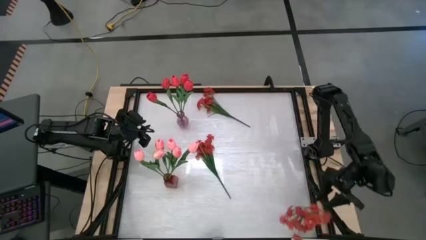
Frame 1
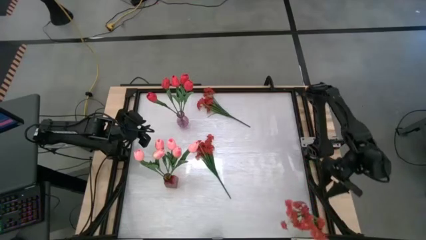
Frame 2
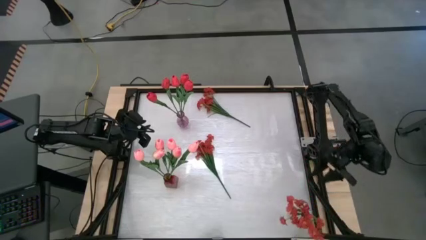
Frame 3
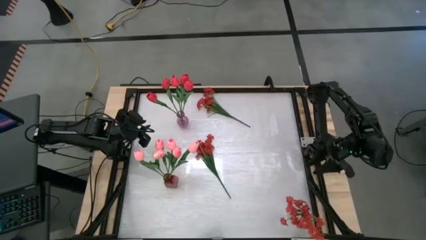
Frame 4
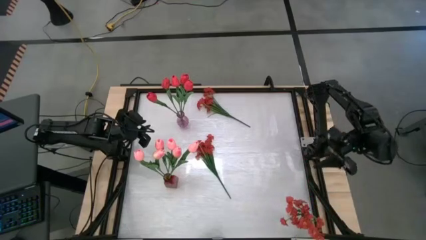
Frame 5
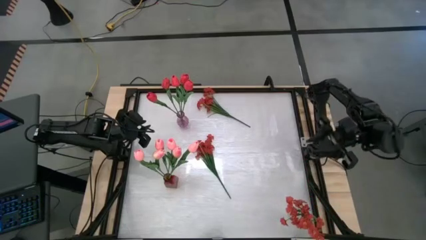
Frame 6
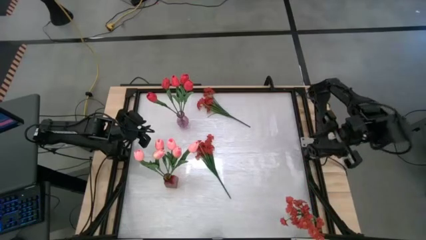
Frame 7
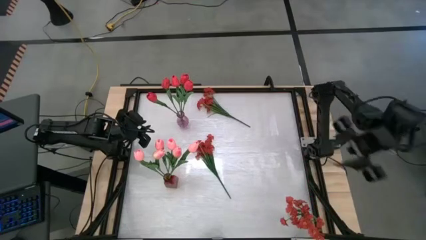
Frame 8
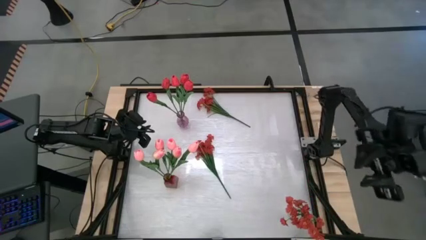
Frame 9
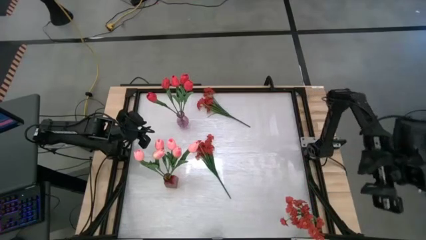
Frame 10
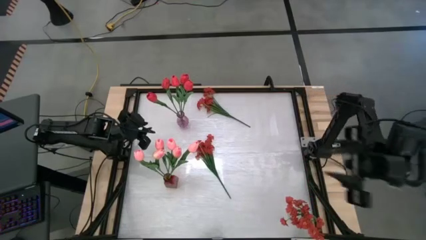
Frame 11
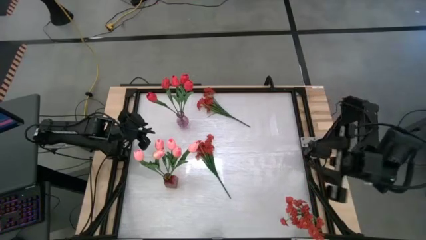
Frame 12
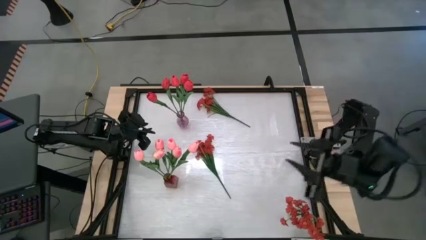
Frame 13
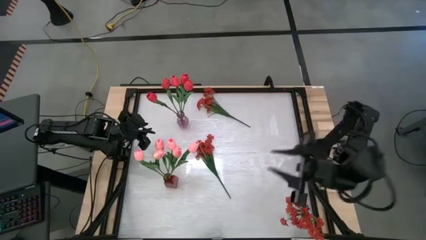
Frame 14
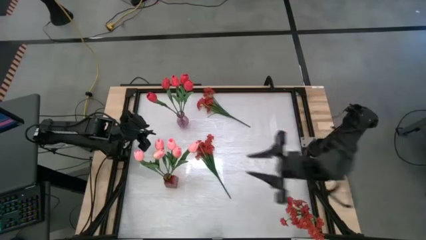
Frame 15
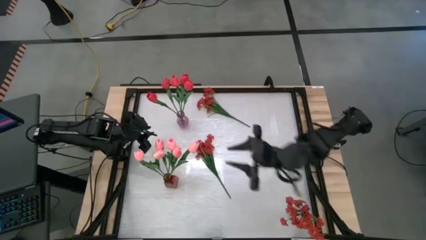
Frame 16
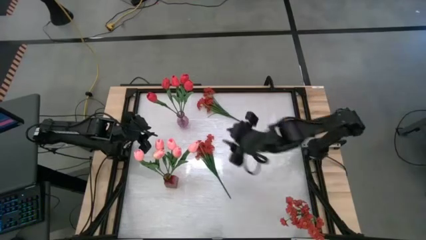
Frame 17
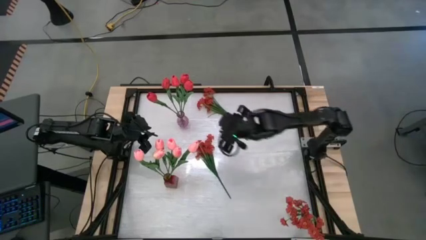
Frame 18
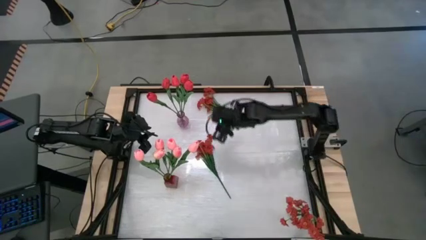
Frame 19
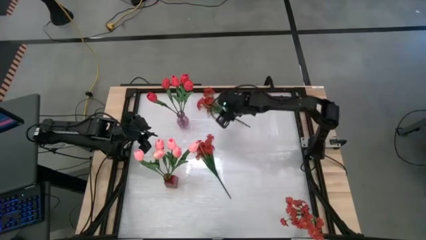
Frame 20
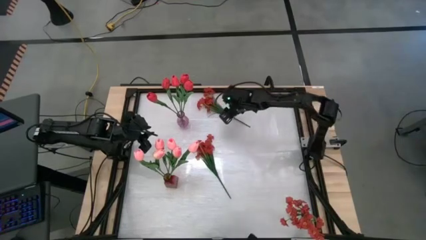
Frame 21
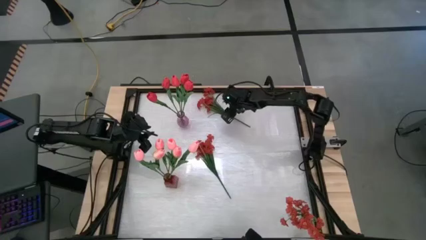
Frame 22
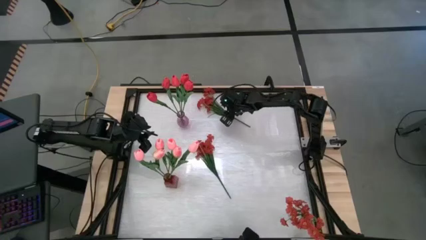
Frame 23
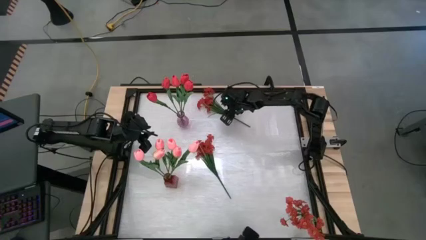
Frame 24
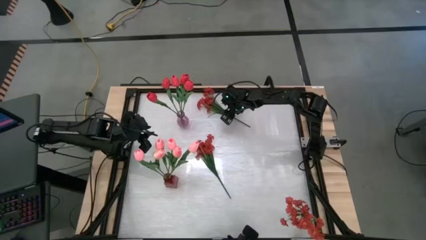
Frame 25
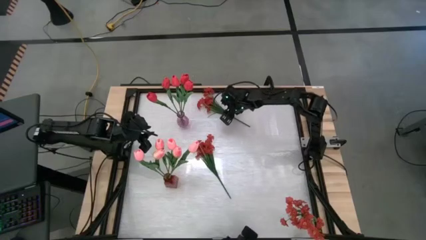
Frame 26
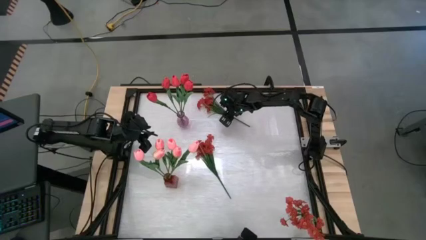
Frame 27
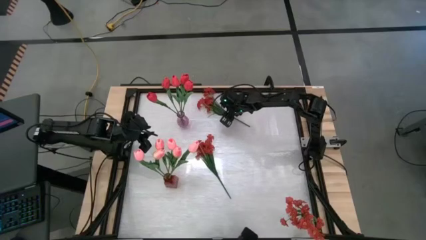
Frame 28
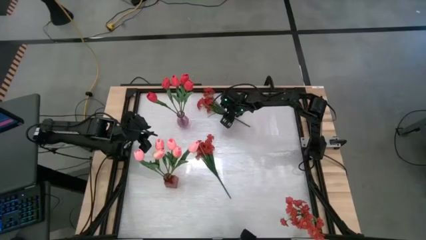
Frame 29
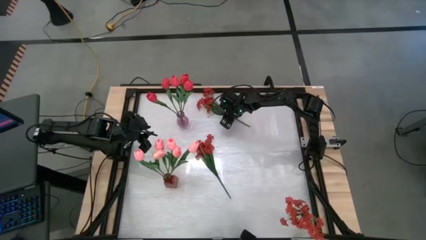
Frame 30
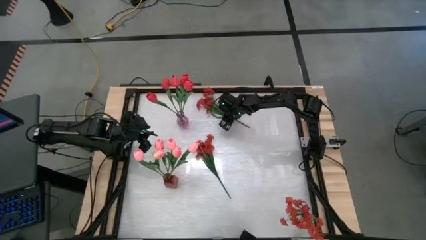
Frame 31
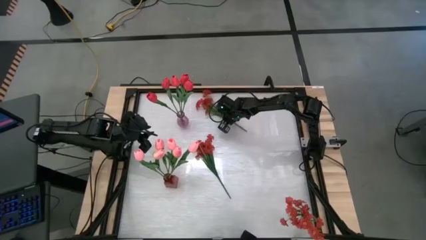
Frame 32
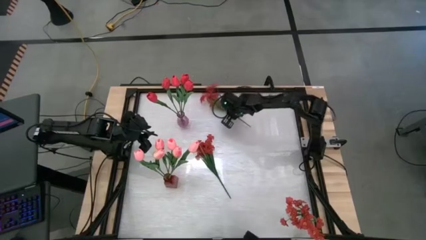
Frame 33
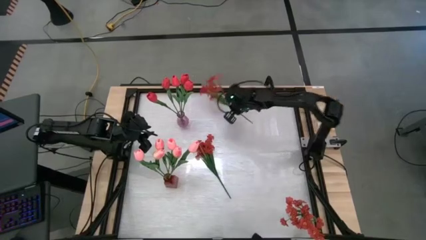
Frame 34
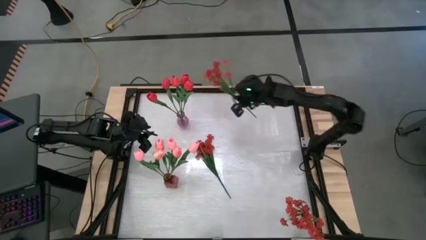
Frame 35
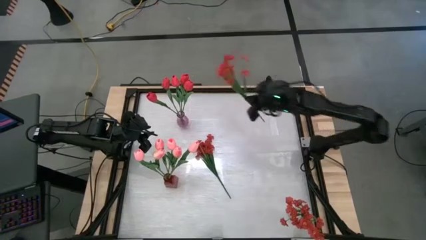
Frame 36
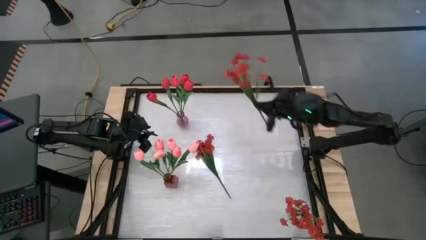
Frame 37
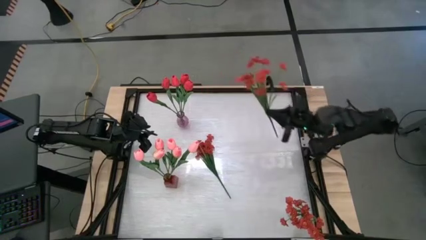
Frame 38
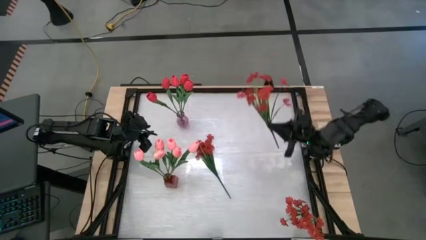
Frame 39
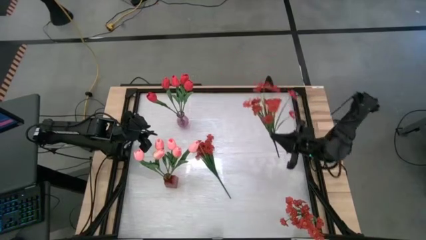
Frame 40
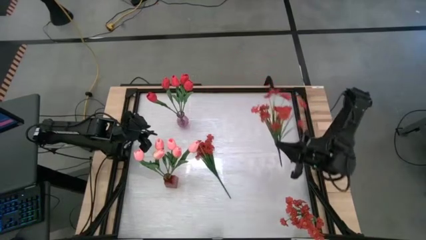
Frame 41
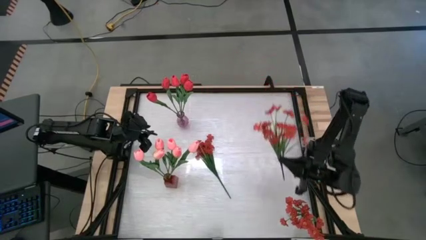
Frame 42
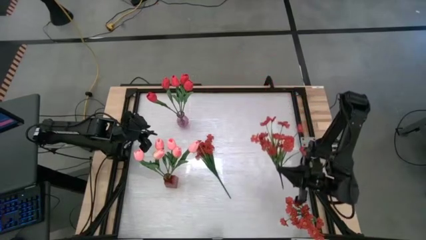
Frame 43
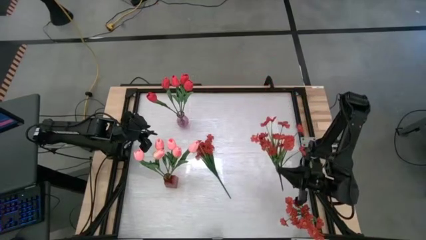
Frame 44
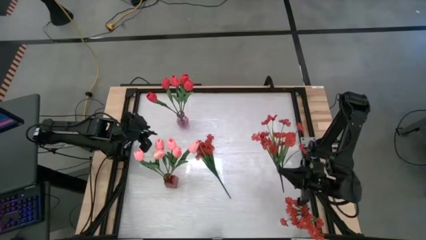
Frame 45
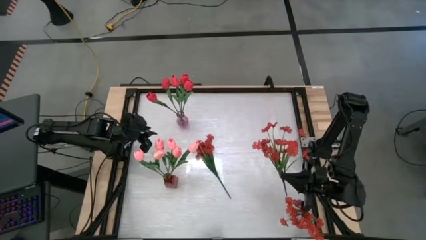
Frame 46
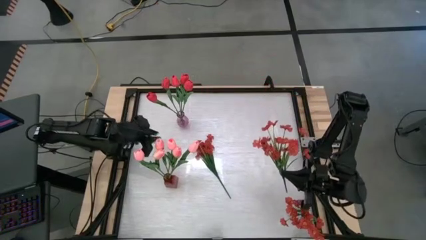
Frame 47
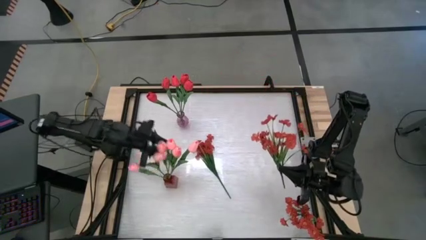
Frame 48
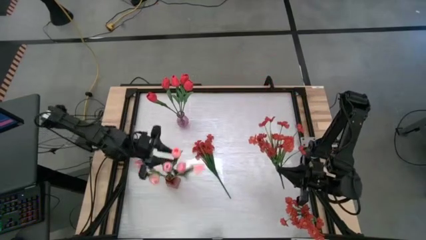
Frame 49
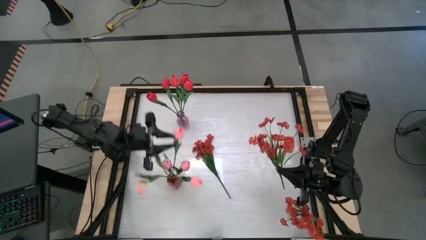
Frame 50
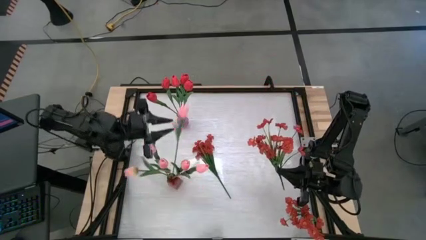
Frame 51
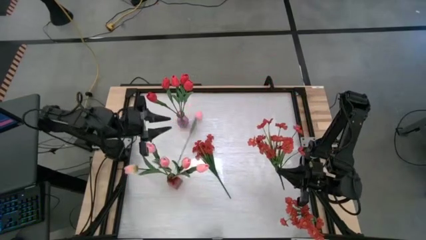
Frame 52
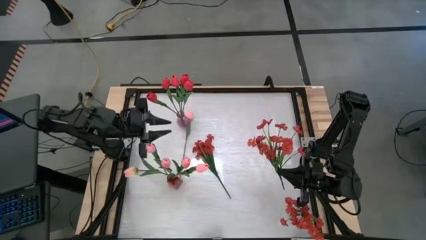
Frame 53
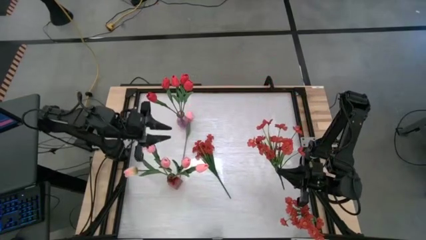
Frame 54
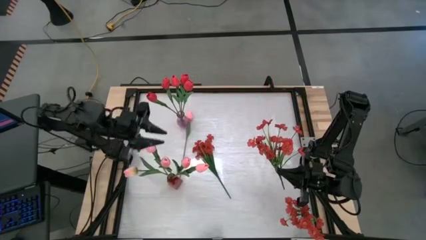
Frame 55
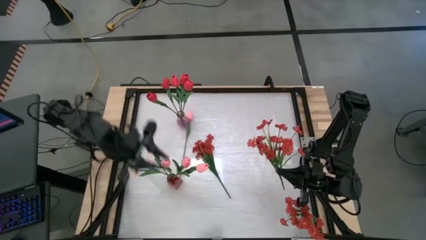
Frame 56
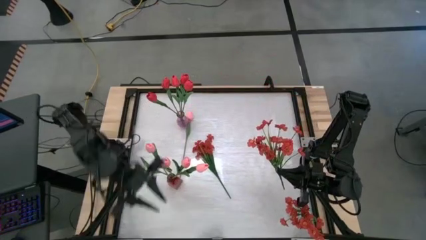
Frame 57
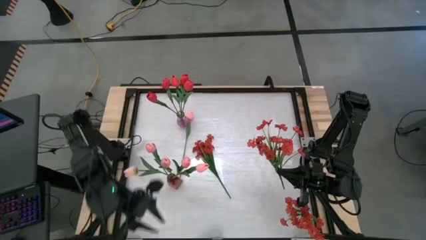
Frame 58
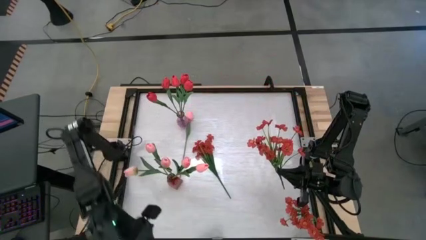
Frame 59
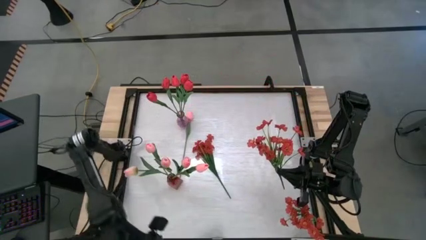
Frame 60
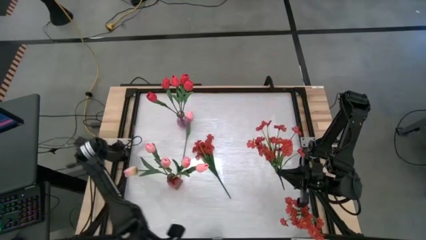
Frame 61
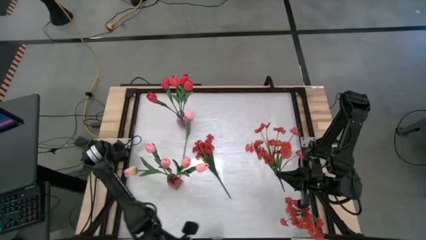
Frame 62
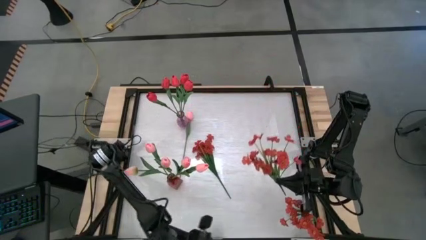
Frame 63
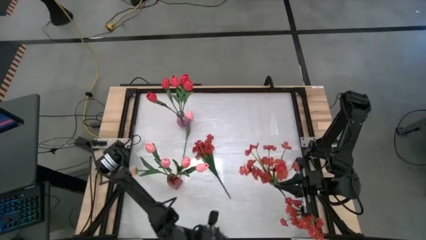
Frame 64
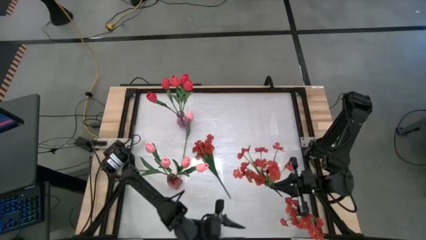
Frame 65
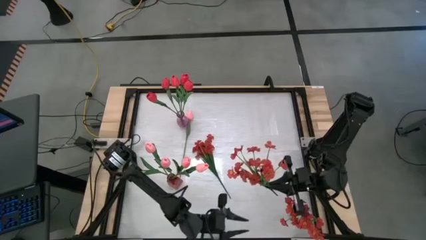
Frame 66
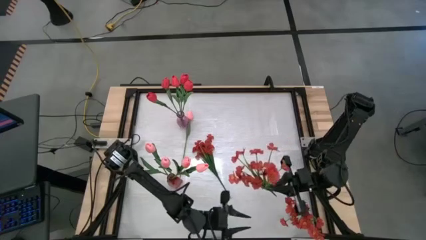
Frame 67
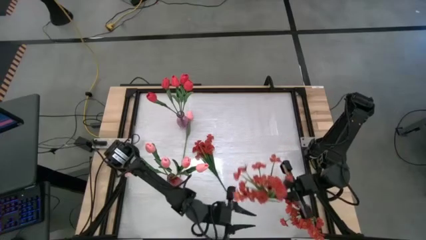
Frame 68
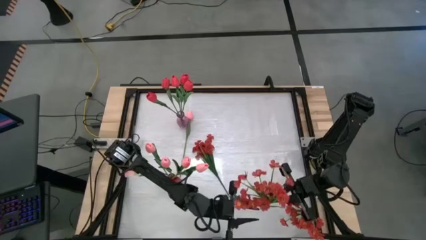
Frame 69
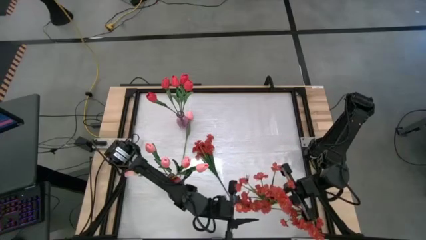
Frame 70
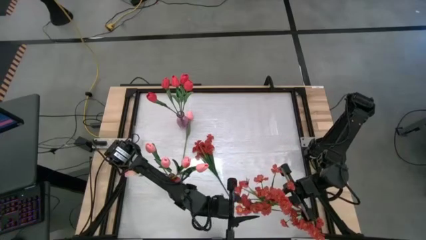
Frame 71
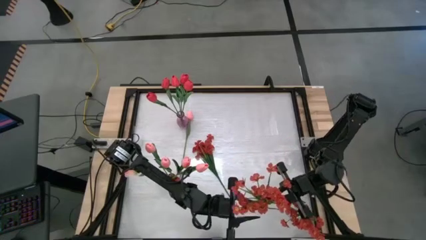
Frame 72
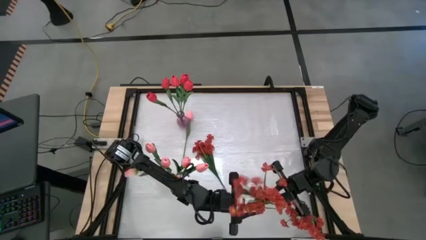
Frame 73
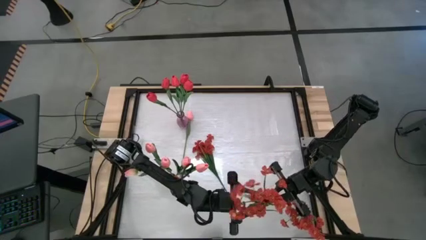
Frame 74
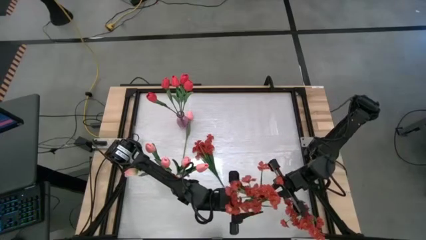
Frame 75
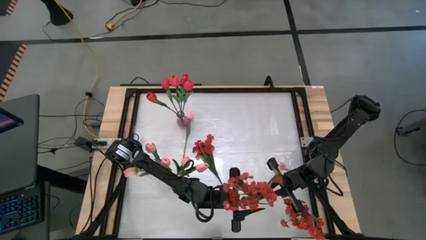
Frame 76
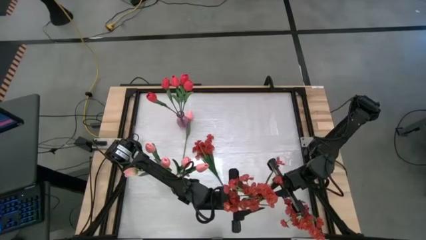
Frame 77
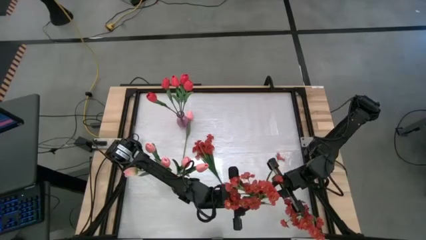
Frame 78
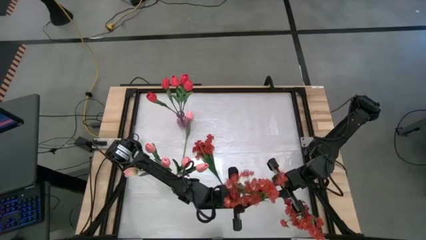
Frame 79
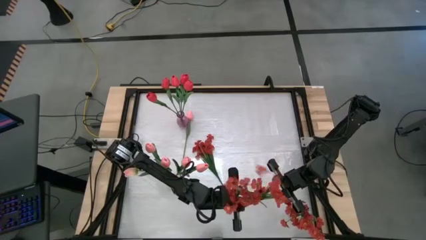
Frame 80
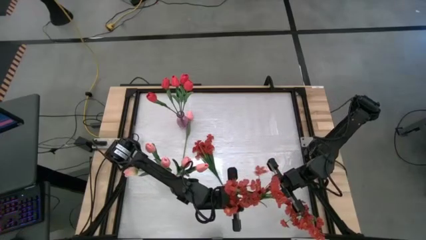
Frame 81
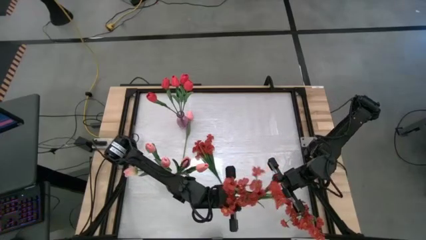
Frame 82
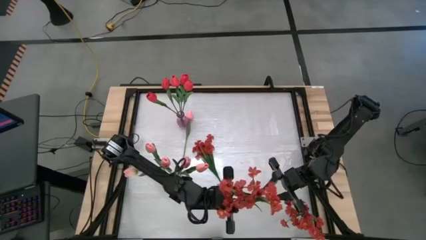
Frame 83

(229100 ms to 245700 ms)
Task: Sort flowers into vase by color
Put the red flowers into the transparent vase
